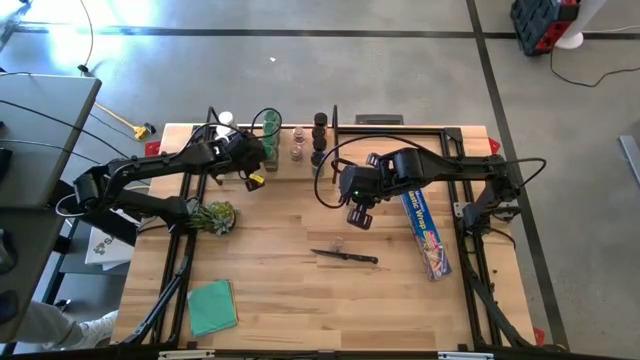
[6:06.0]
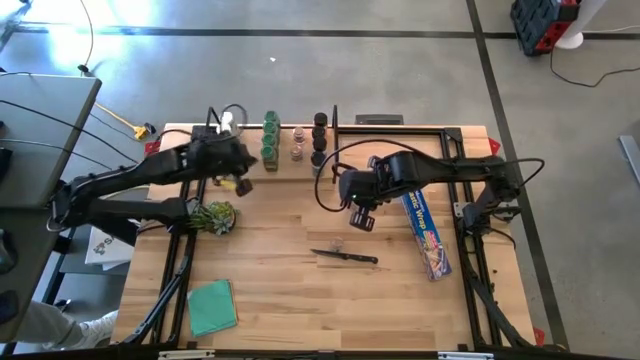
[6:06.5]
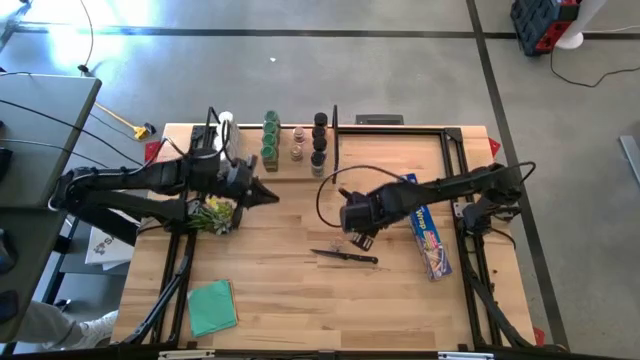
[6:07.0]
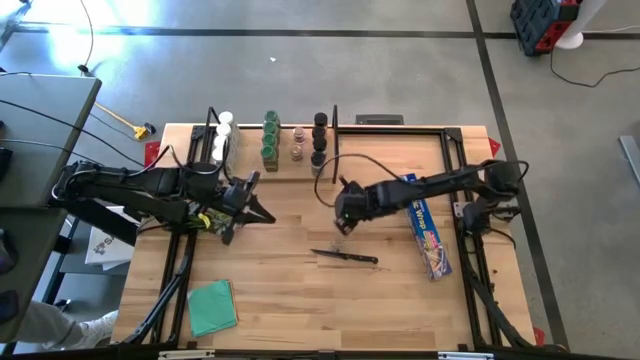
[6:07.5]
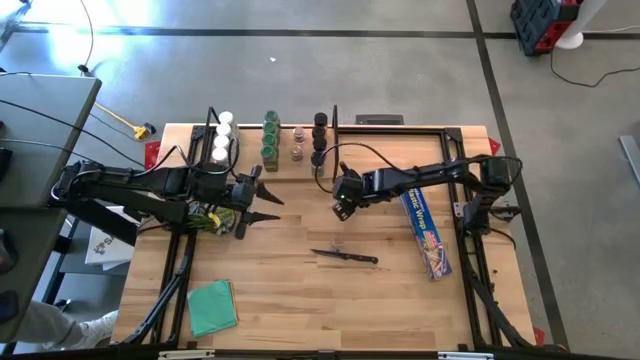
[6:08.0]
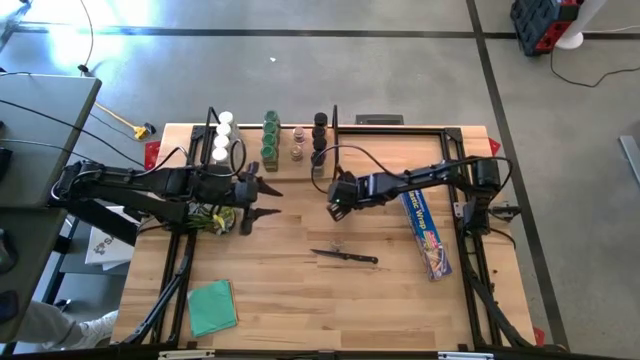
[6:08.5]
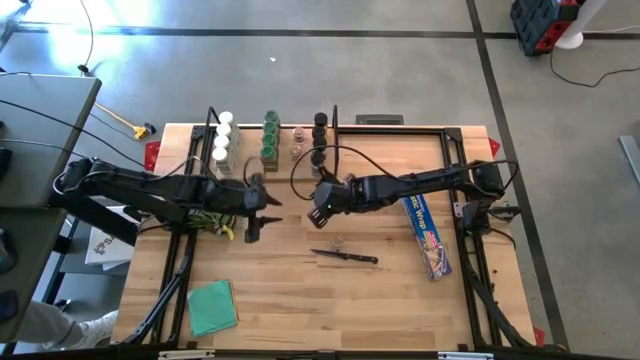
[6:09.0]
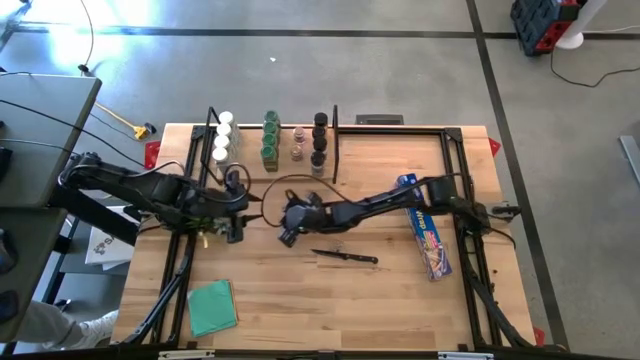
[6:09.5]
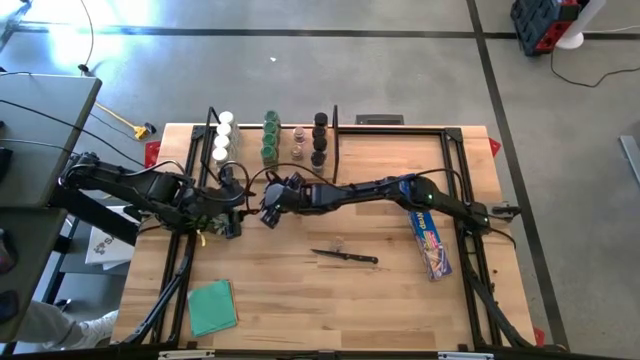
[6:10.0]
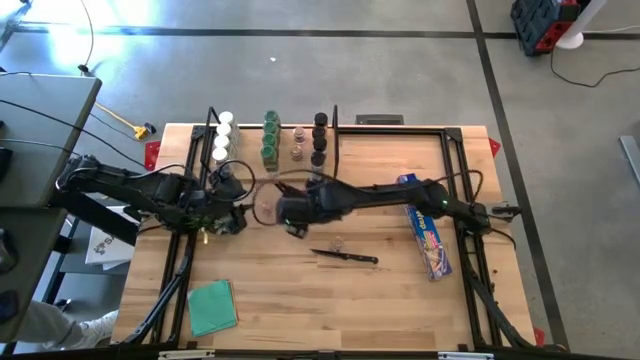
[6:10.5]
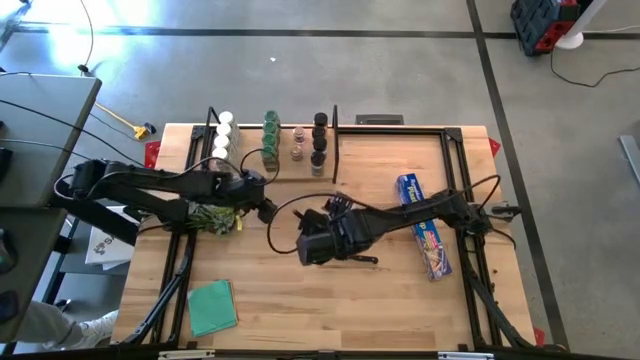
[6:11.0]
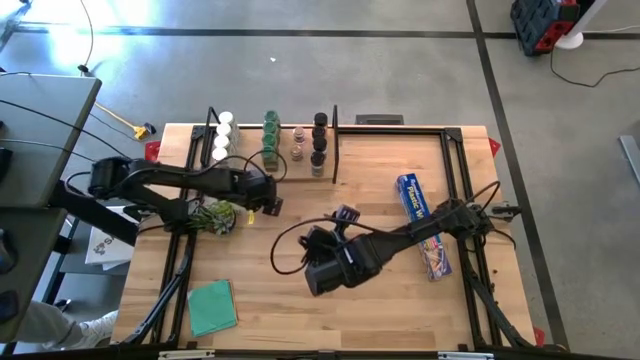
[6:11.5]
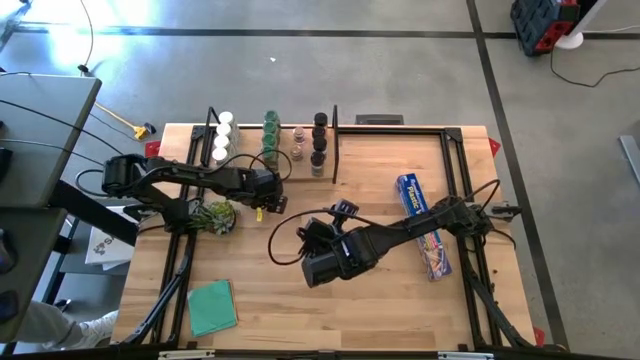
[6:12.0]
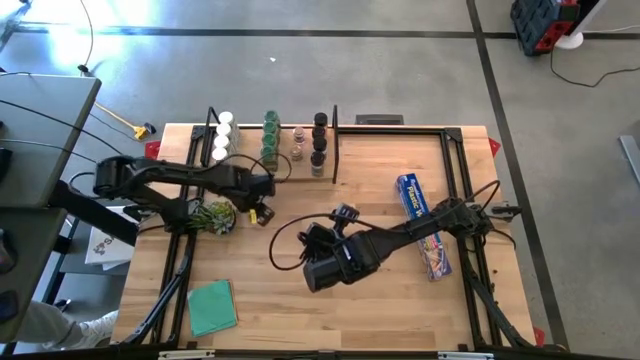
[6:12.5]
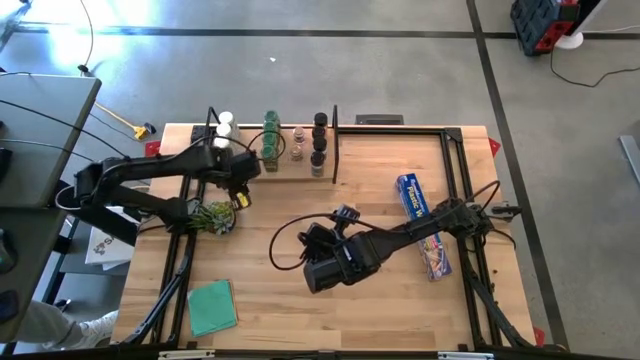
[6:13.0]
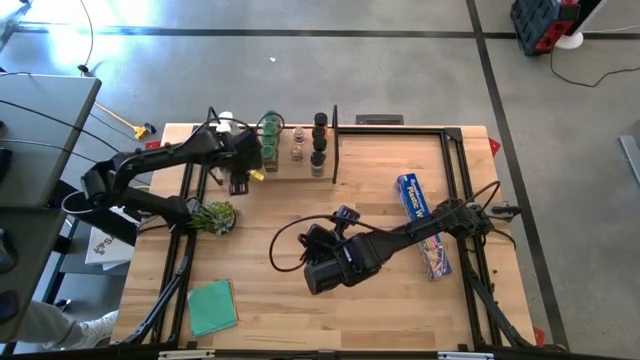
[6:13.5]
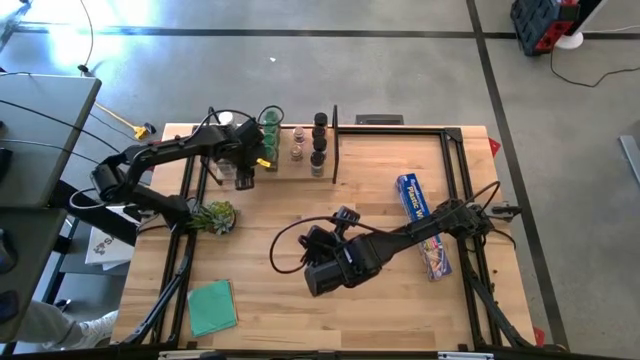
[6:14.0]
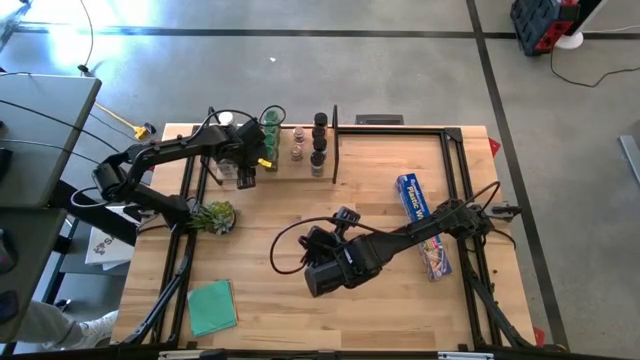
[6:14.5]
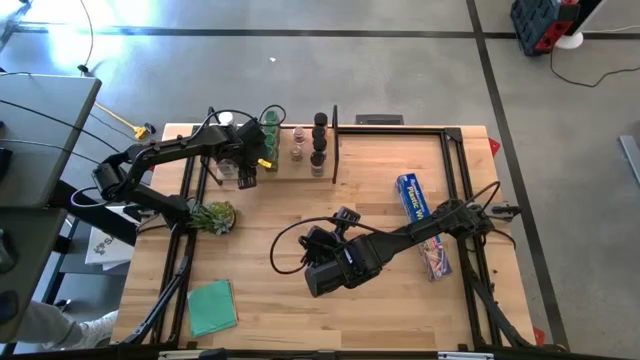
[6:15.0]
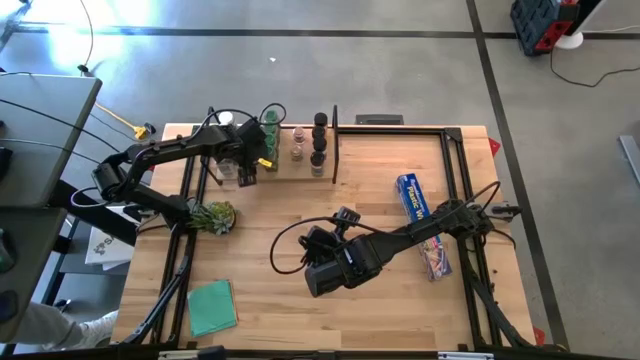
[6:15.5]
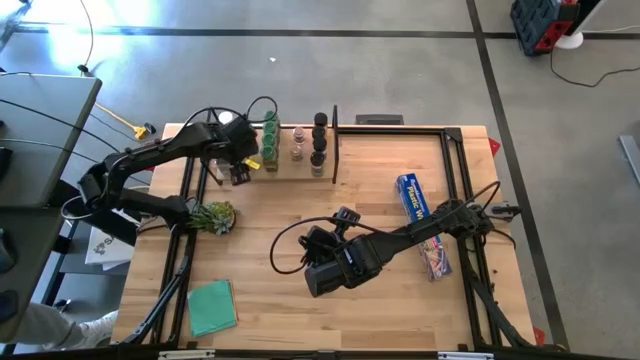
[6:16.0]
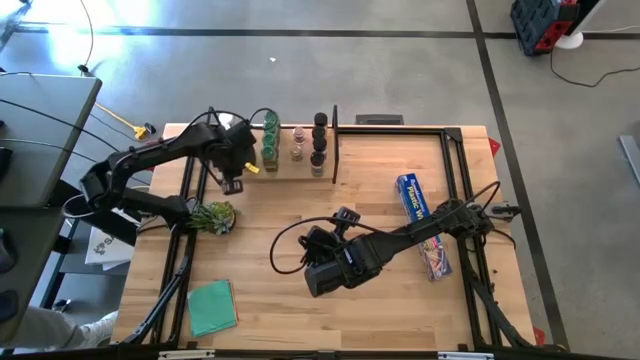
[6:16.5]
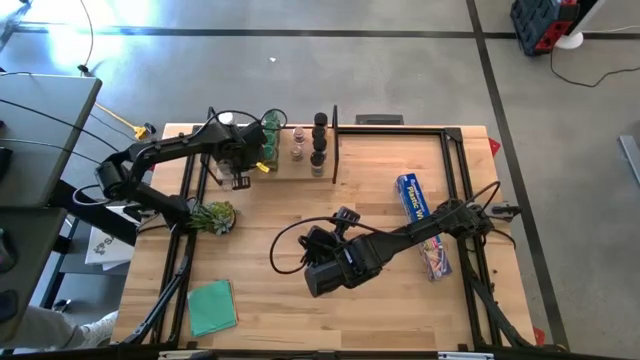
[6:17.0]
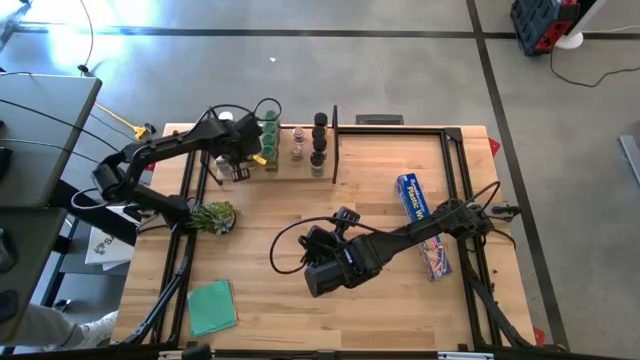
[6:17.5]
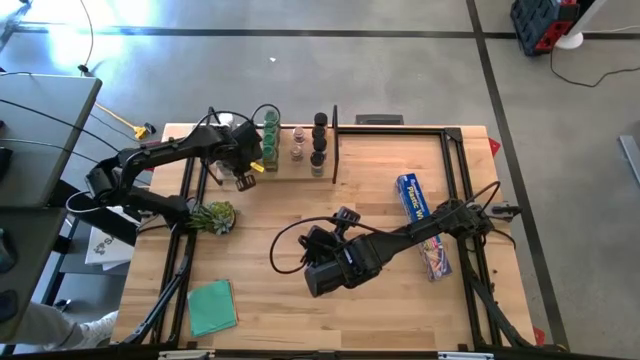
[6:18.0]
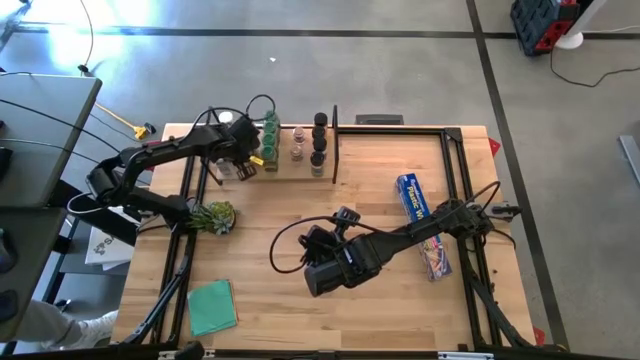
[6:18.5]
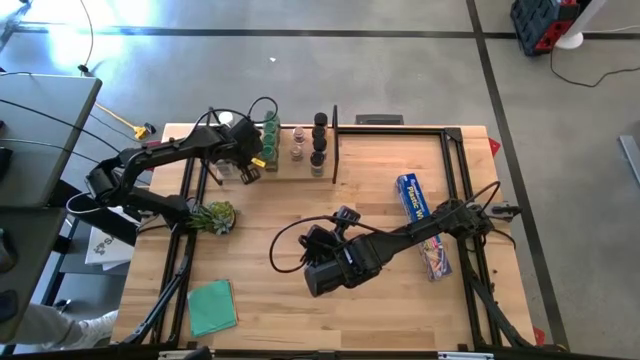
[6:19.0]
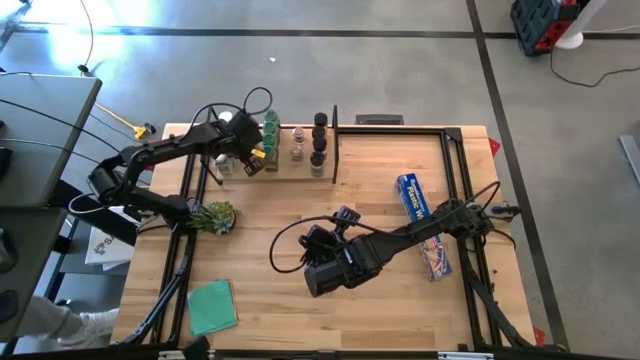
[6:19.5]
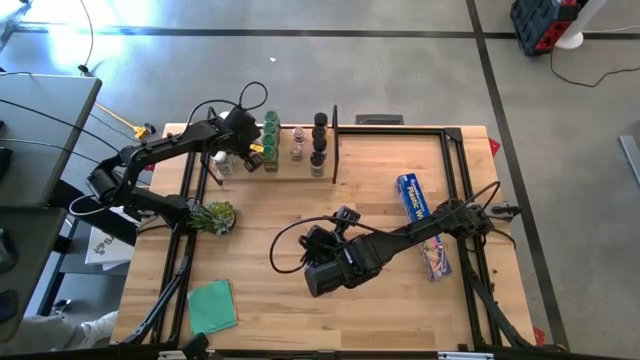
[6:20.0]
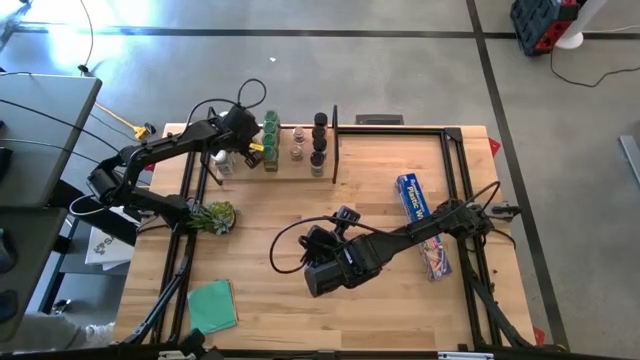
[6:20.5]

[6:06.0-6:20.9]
Task: Shelf spices
Put the brown lid on the seasoning bottle

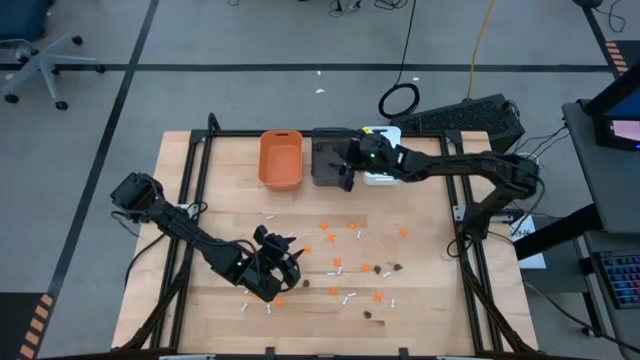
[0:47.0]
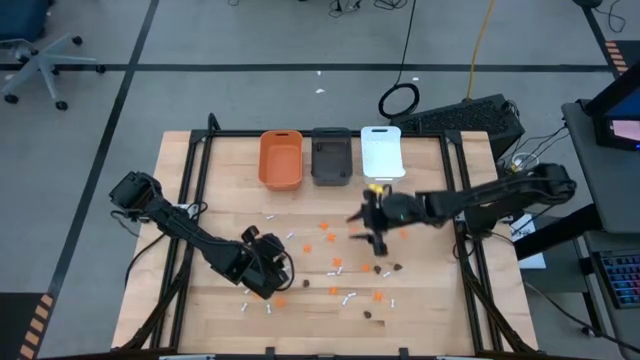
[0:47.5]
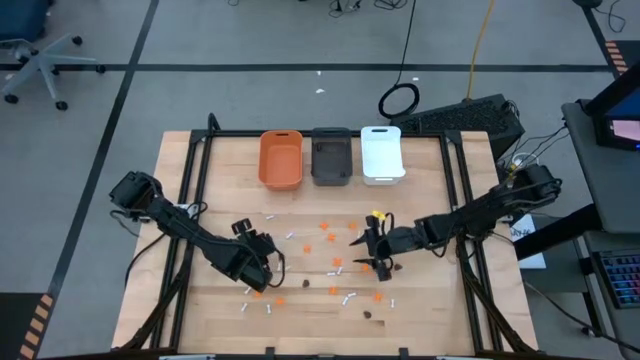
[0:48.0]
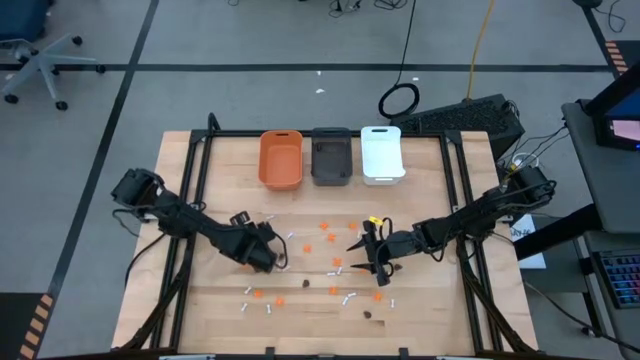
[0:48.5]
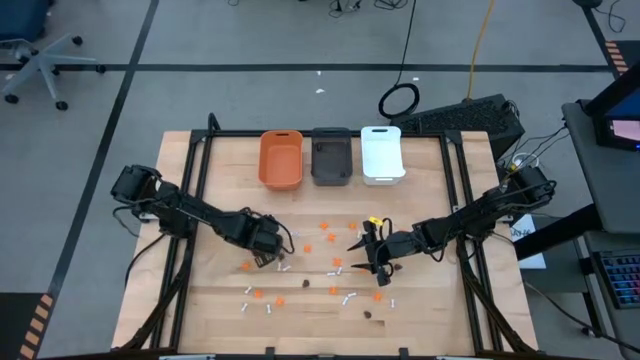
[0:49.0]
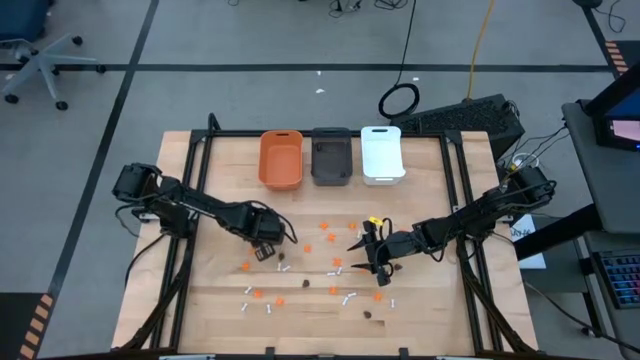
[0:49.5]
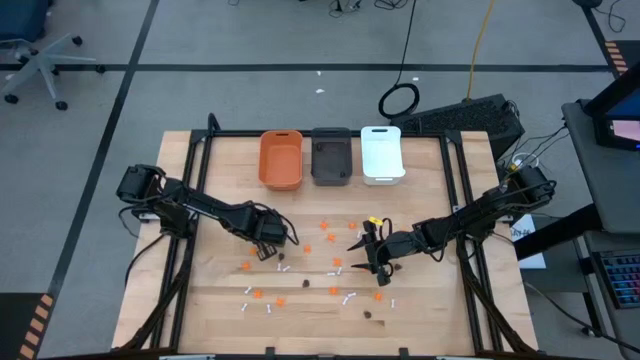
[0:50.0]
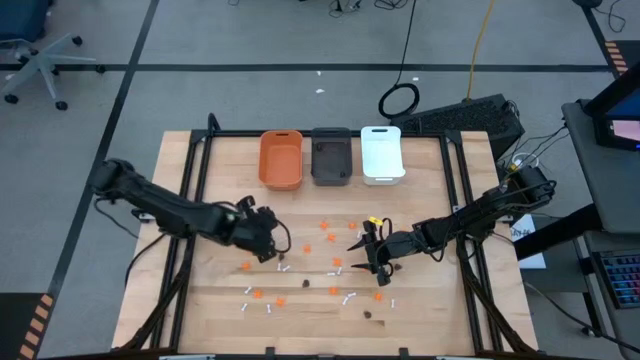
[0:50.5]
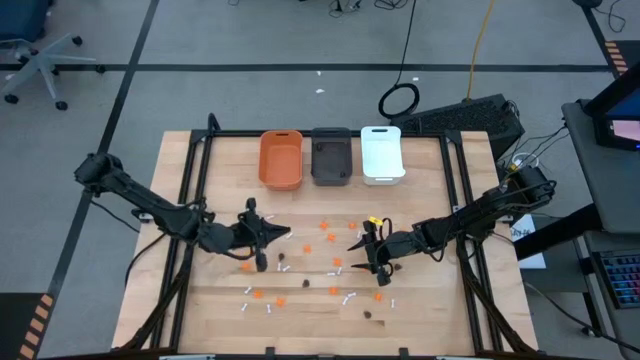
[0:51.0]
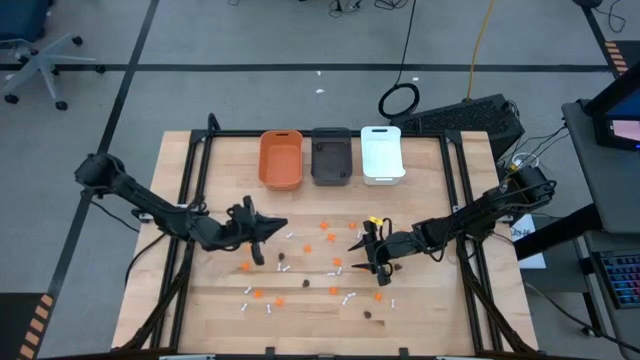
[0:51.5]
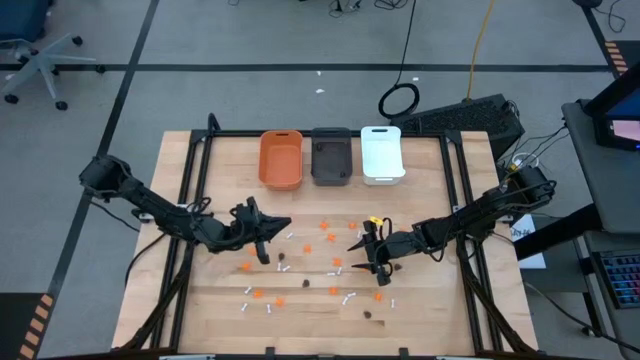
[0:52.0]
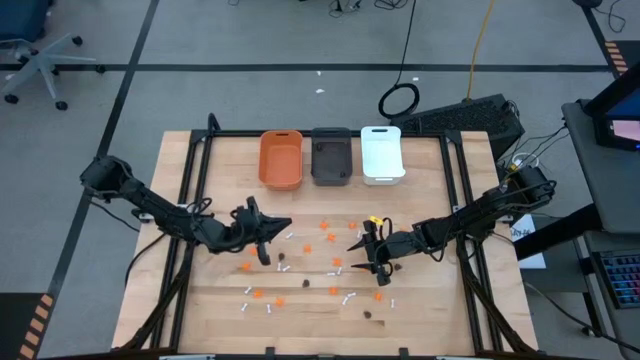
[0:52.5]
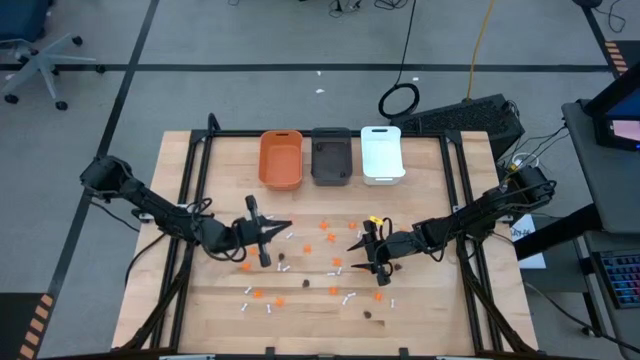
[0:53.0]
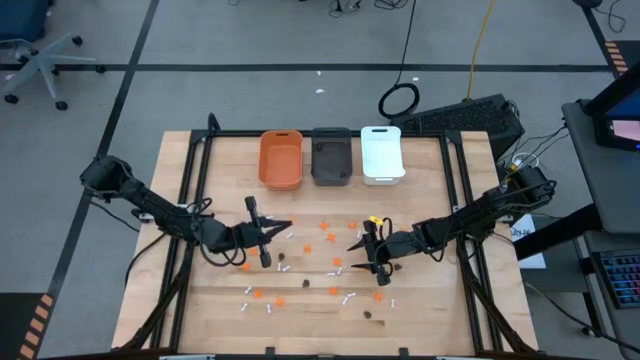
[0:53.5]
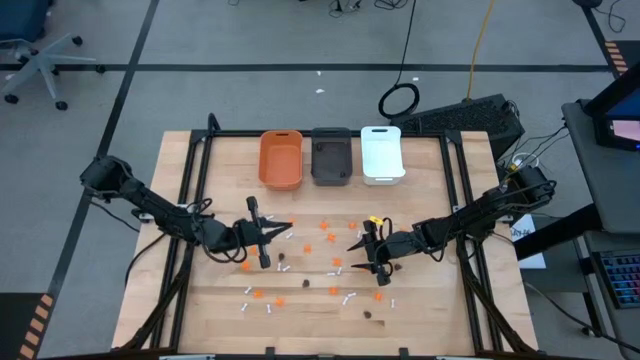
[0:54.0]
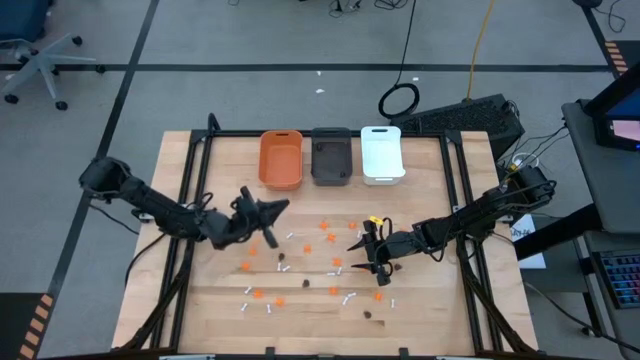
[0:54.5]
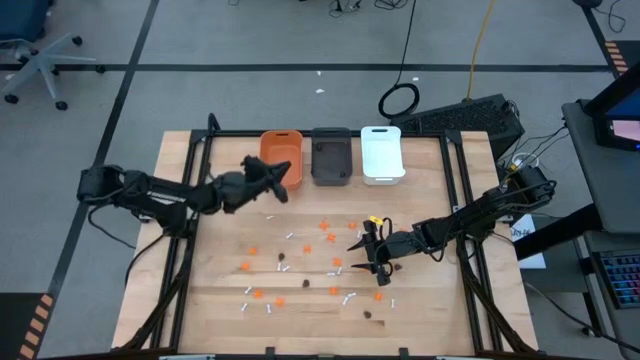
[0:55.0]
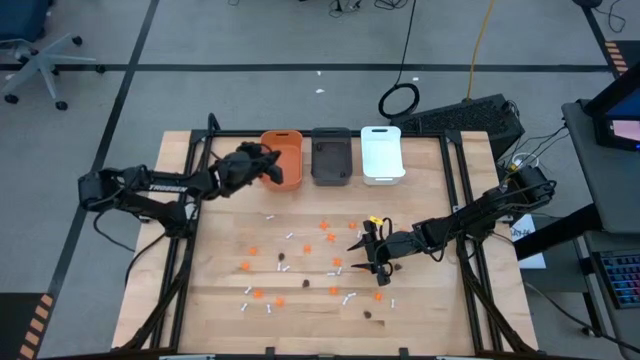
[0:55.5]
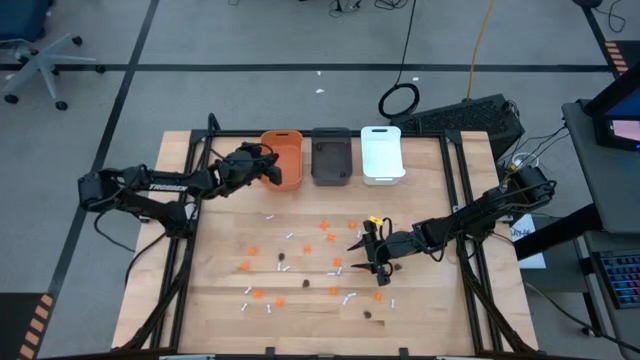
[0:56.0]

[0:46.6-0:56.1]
Task: Sort Halloween decoration
Put the orange spider toy into the orange bin
